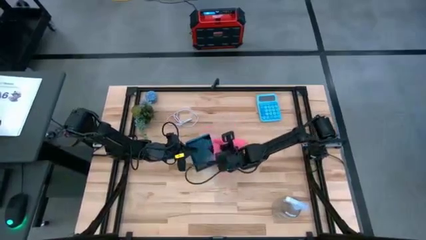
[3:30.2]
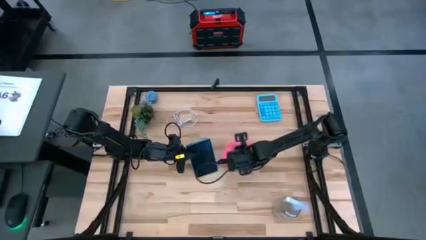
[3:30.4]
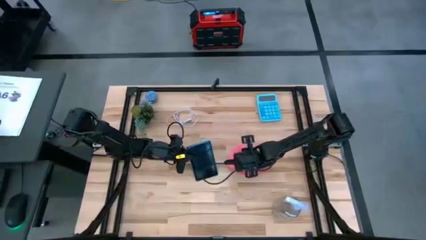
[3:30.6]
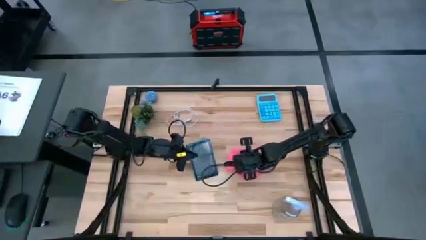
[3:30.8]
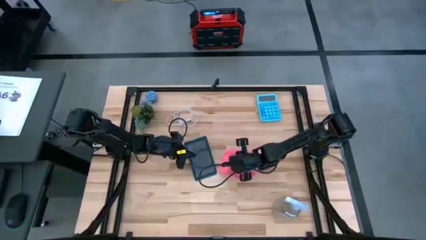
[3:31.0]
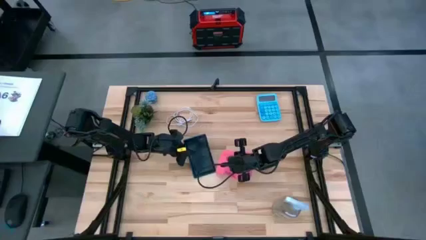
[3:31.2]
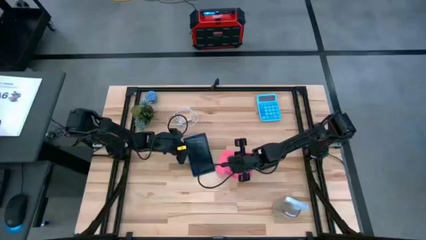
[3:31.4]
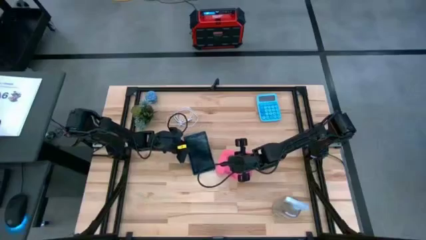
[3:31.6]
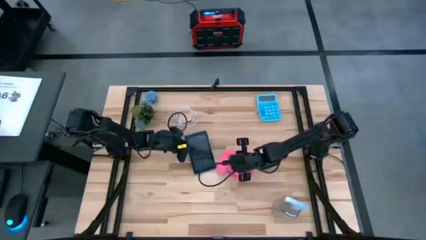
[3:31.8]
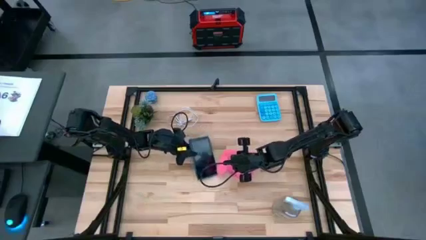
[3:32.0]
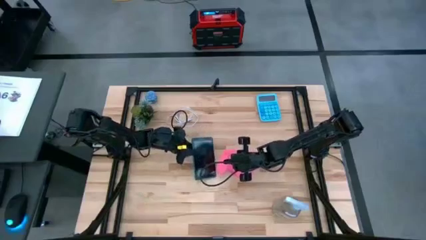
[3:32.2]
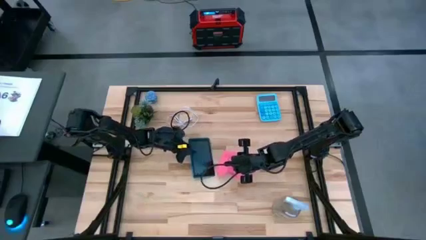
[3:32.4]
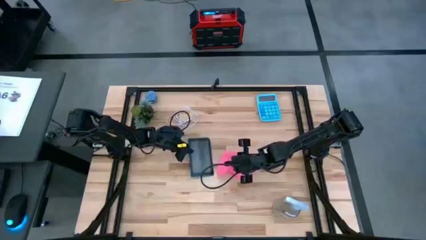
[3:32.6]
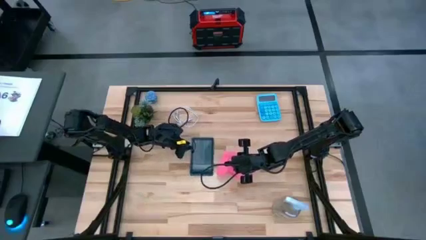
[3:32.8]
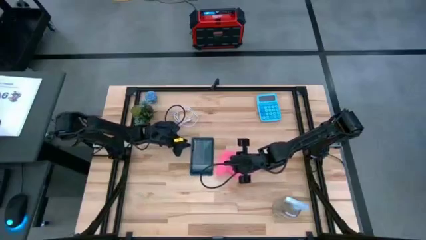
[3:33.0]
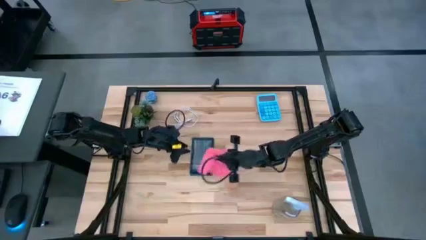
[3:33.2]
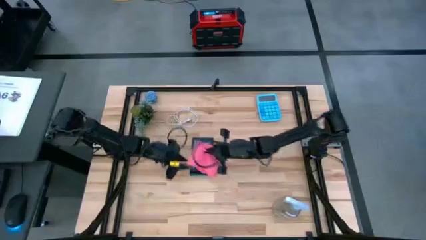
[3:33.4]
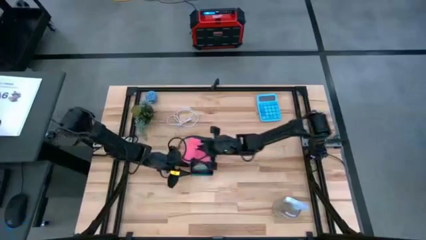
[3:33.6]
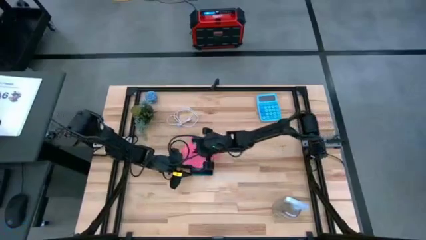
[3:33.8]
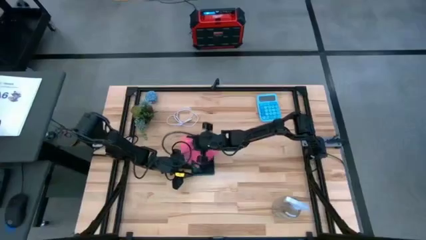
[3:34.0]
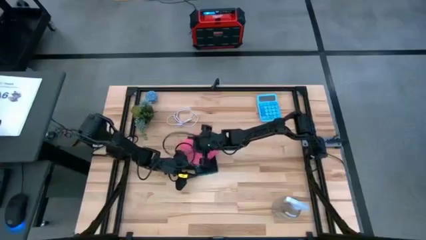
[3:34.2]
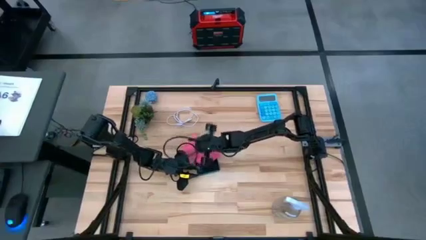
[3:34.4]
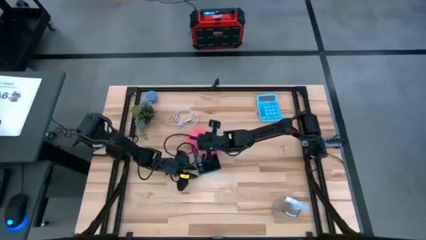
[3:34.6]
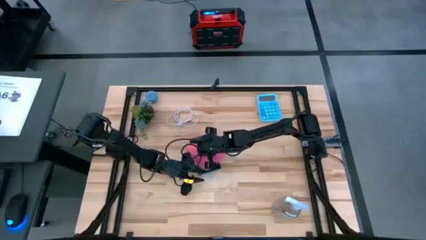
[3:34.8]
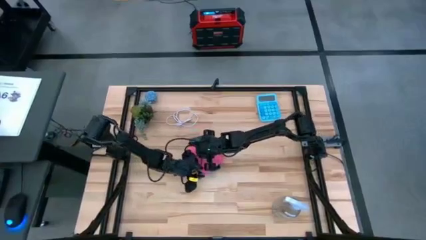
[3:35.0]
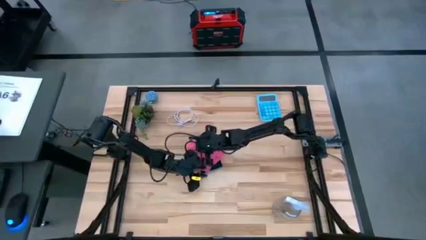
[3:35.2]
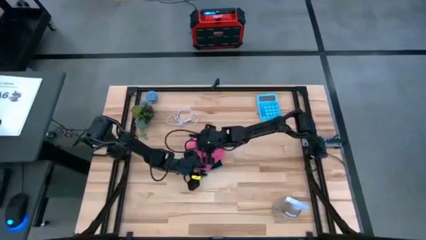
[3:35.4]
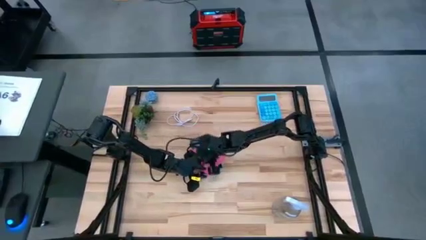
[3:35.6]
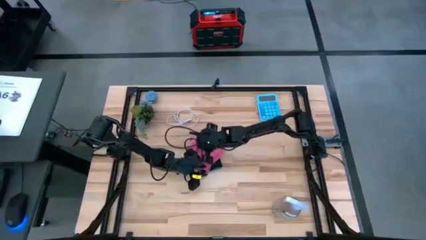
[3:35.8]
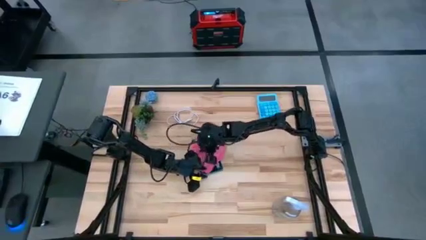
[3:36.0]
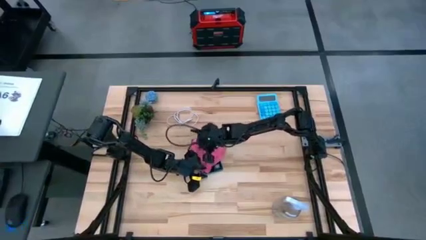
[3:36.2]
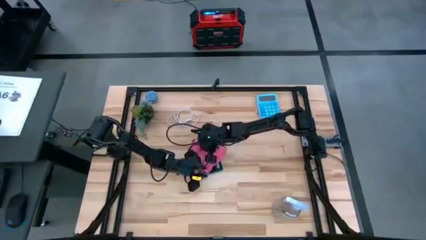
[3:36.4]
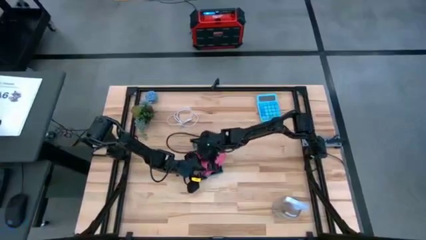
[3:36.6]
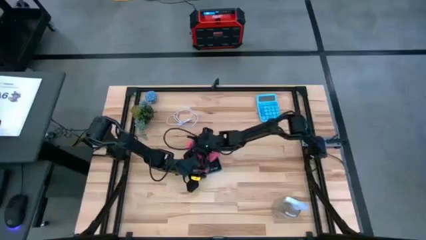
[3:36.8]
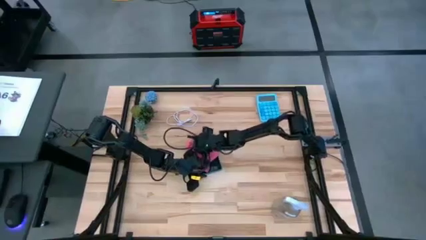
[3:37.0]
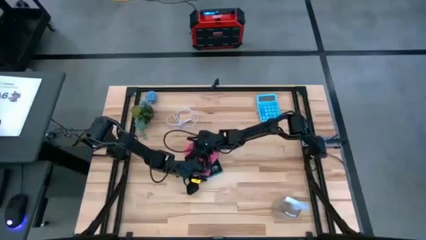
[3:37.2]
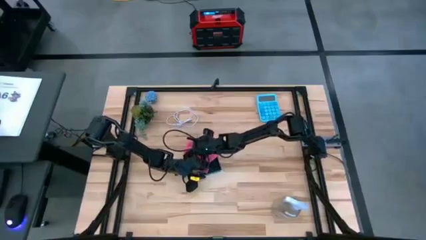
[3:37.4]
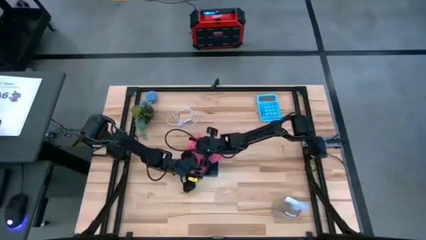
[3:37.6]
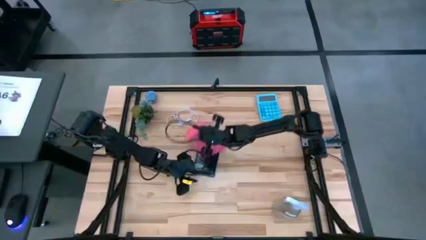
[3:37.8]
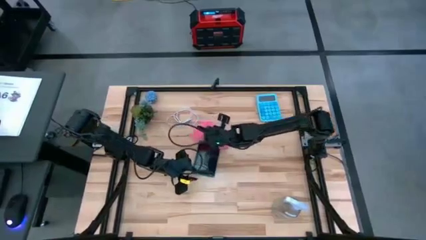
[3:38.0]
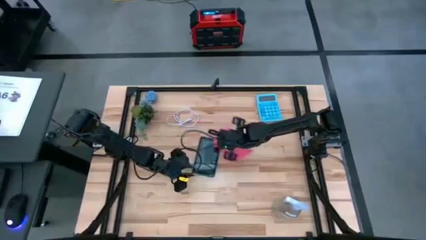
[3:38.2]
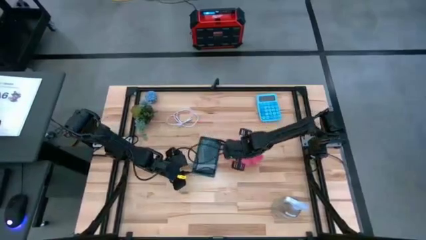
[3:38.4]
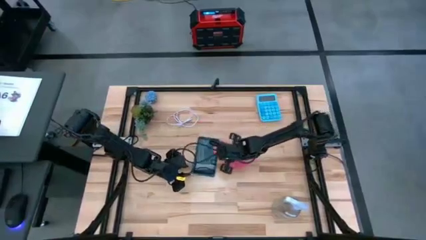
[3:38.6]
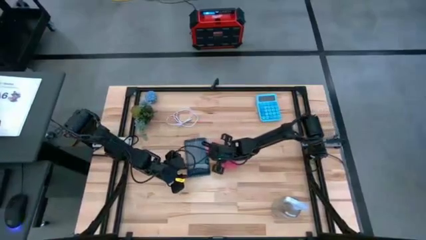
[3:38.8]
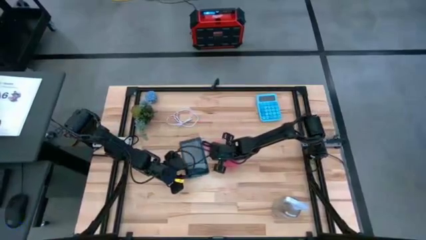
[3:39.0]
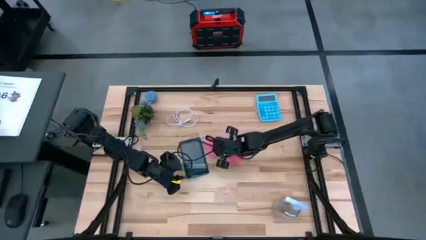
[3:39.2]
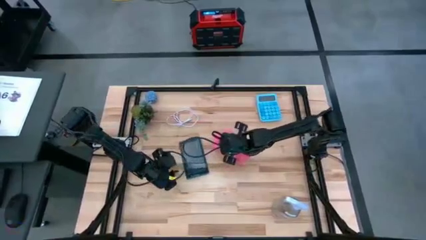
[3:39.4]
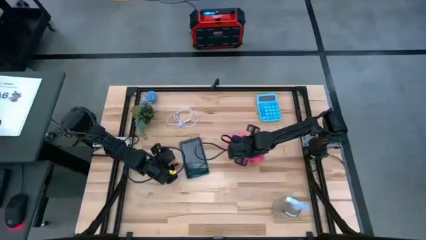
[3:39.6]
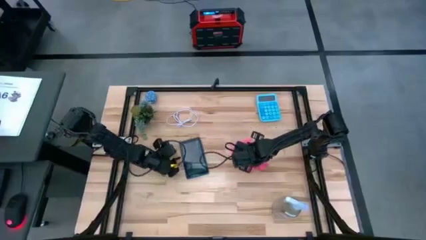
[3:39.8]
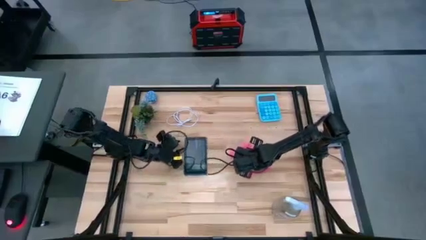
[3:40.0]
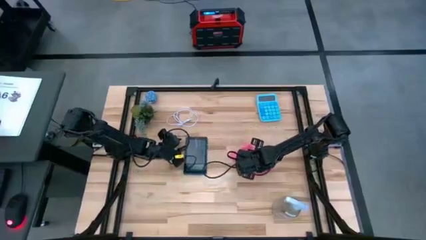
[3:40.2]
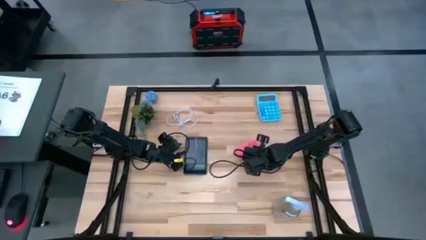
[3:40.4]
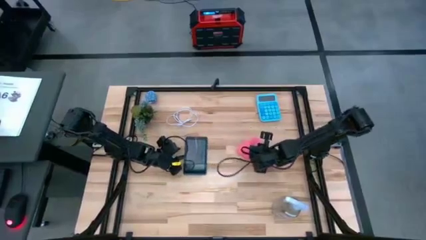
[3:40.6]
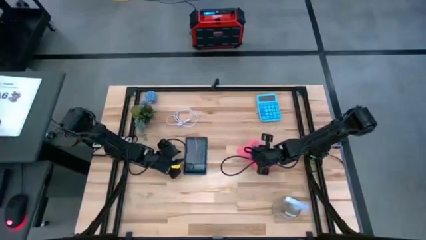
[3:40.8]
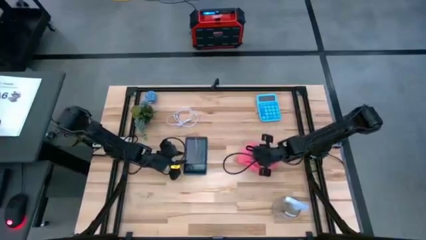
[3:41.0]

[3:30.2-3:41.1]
Task: Apply microfiber cloth
Wipe the front of the cellphone with the pink microfiber cloth

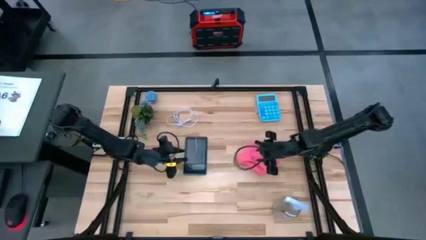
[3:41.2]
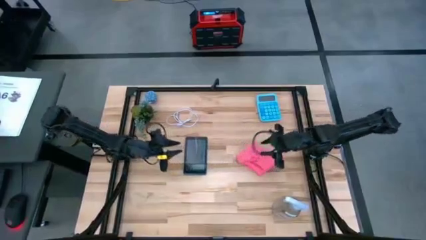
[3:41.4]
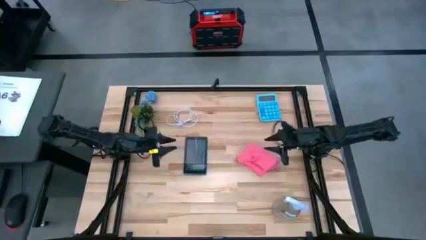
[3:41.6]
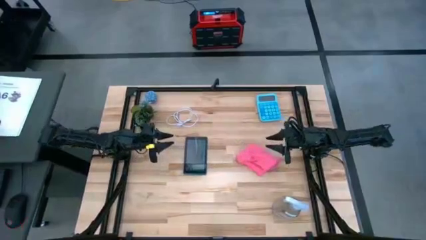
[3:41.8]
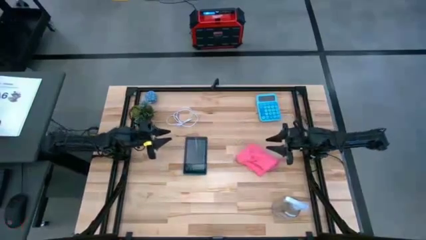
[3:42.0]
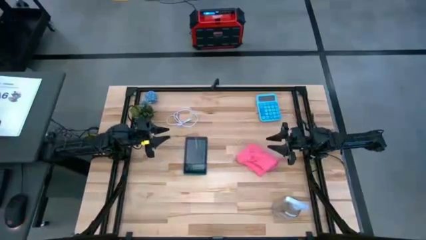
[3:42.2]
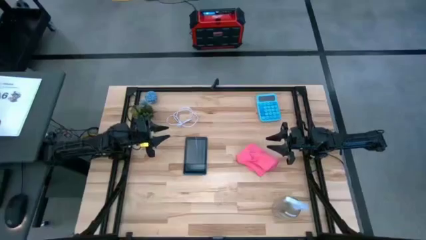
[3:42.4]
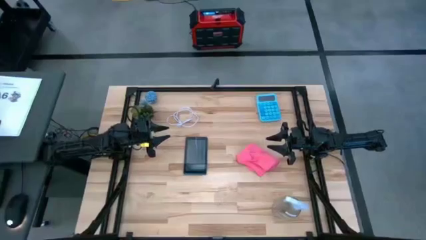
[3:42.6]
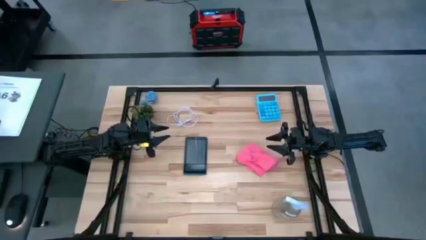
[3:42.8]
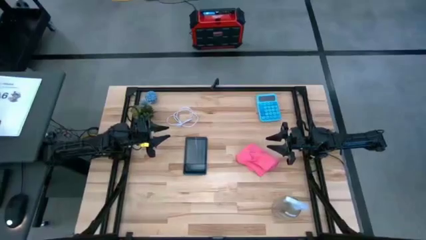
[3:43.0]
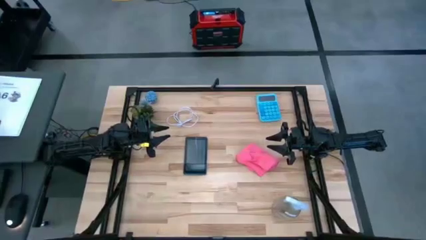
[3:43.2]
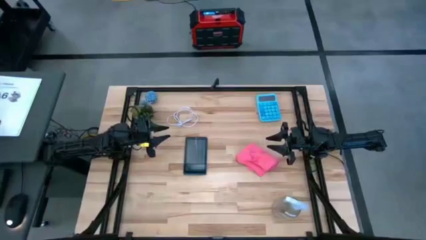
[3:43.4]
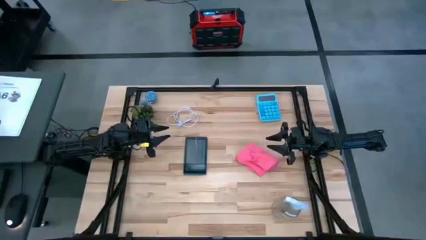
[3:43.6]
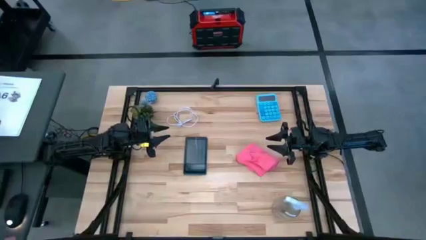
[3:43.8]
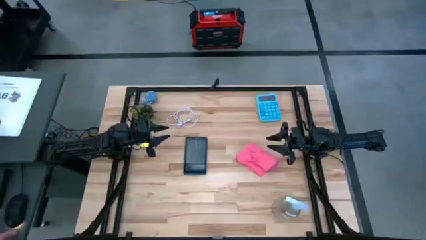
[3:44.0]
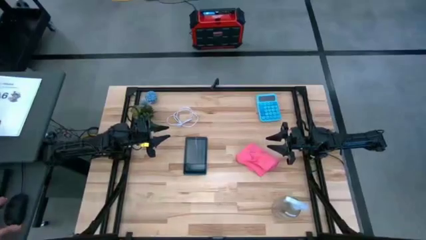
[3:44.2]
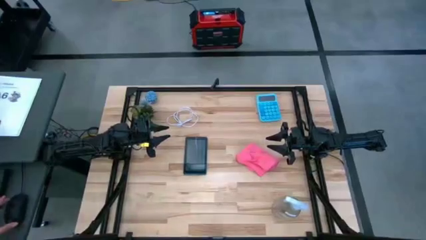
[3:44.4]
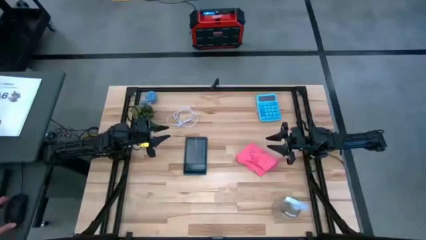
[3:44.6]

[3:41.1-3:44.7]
Return to Home Position
